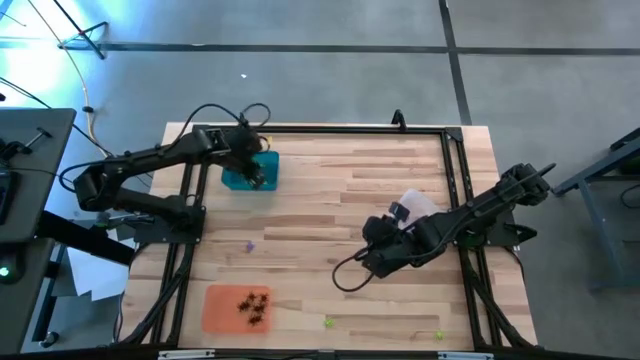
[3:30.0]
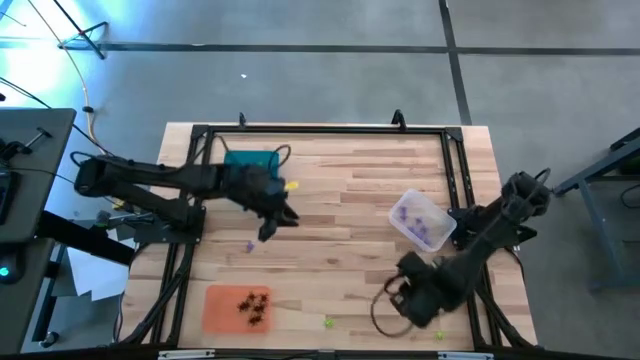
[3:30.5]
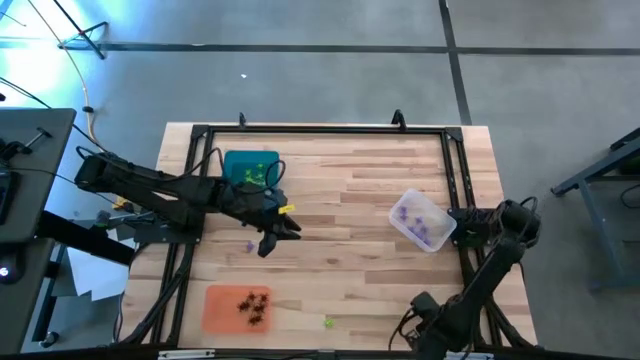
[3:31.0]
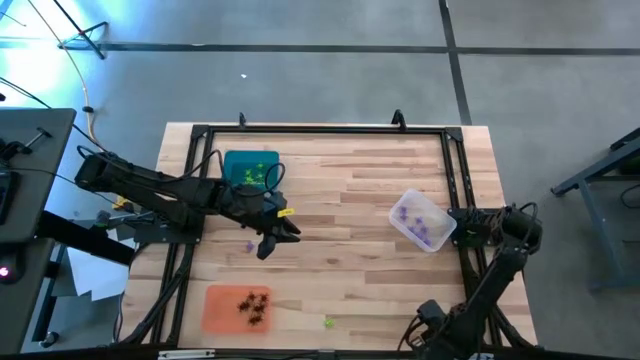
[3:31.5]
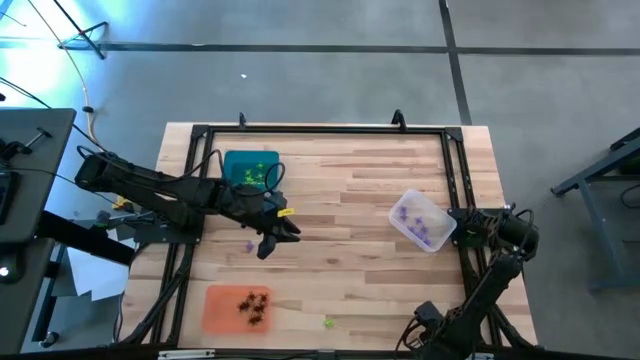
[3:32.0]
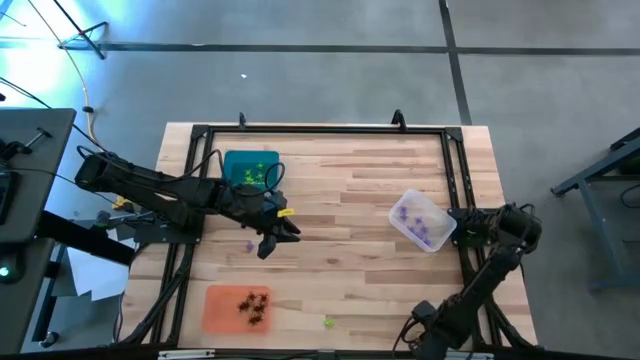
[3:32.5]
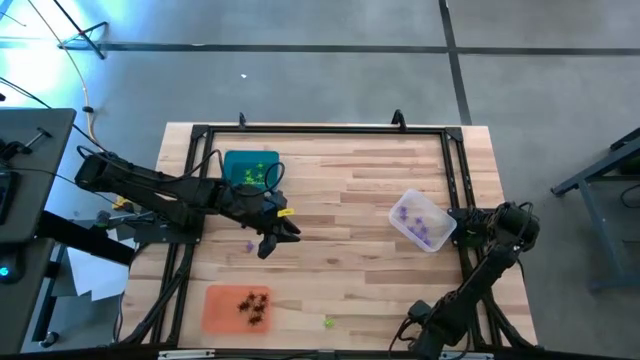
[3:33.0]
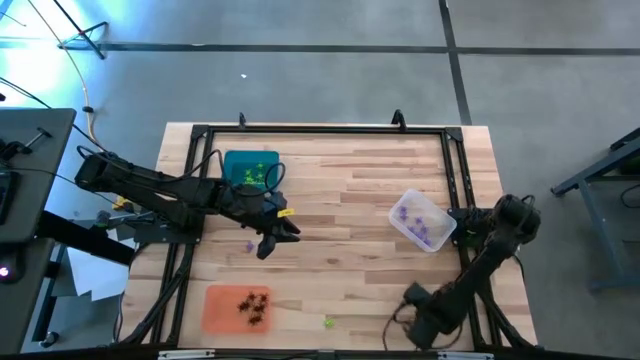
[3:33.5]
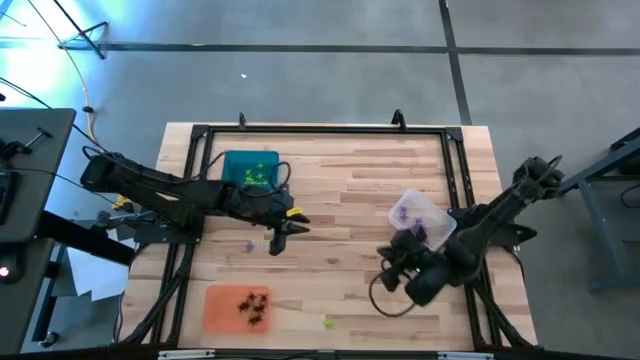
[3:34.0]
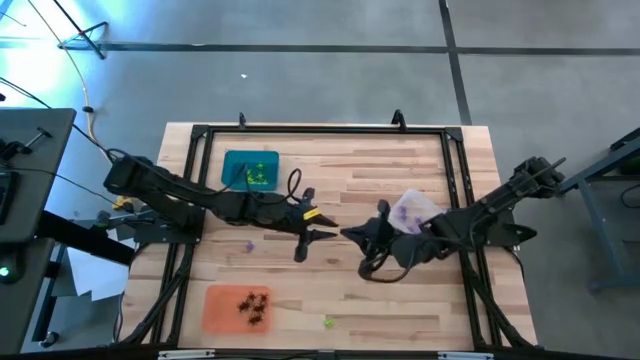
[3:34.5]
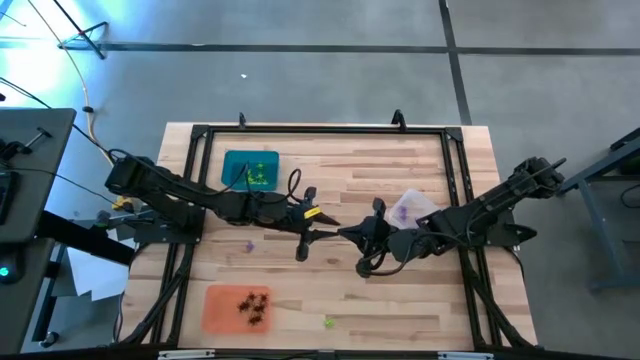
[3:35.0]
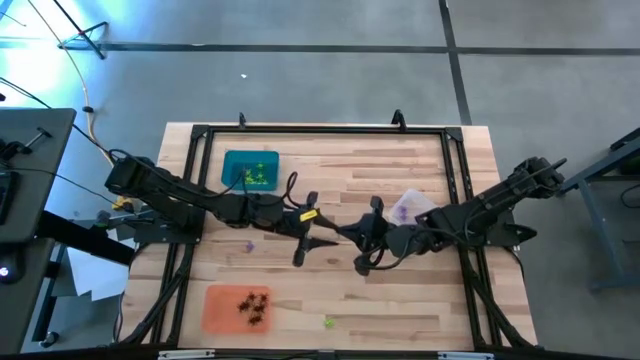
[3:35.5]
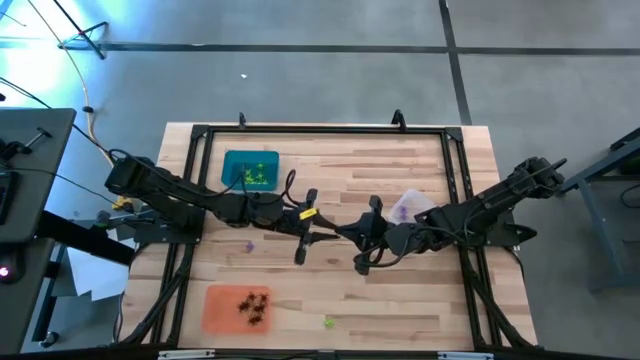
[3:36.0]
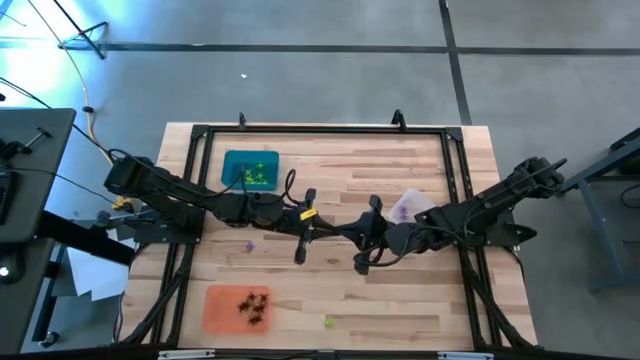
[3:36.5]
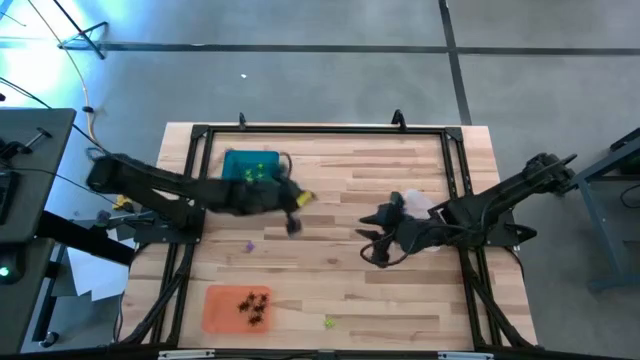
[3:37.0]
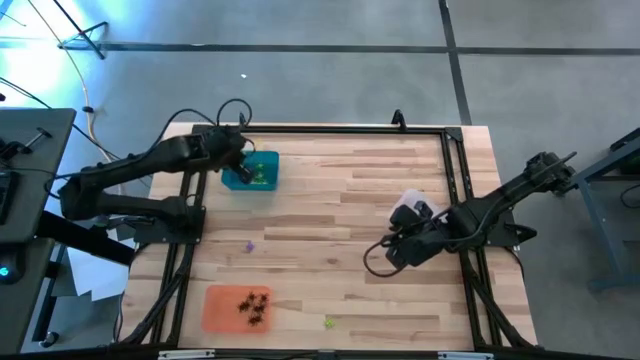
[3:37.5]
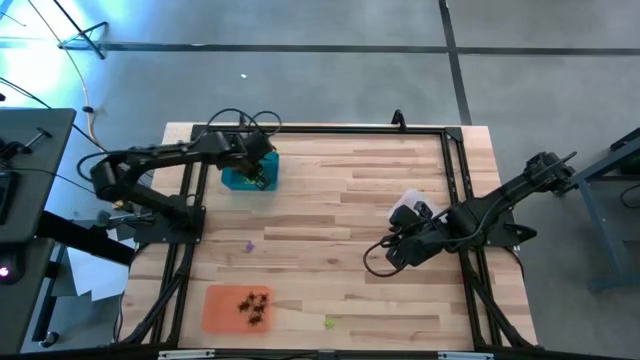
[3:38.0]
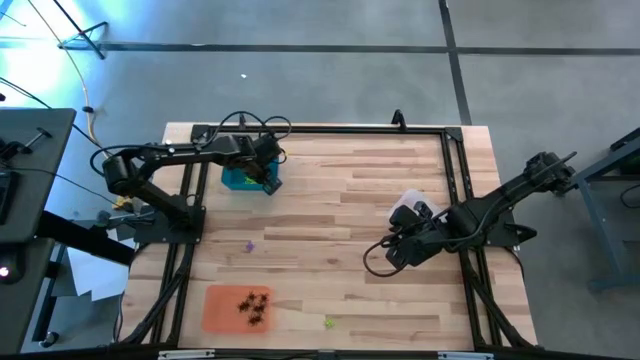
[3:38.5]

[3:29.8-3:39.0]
Task: Sort Halloween decoration
Put the green spider toy into the blue bin

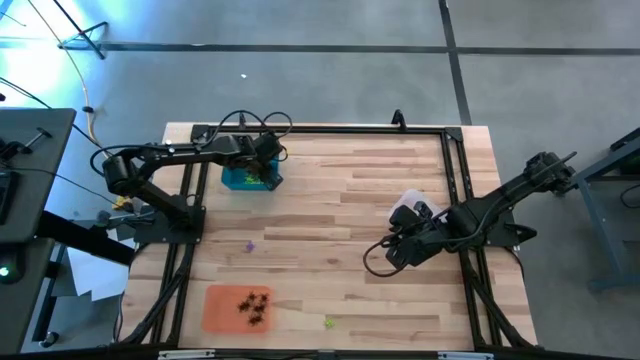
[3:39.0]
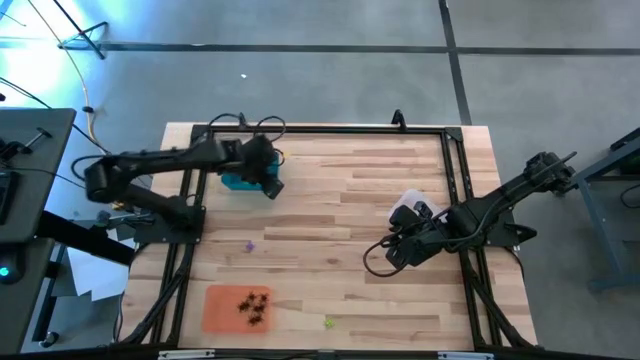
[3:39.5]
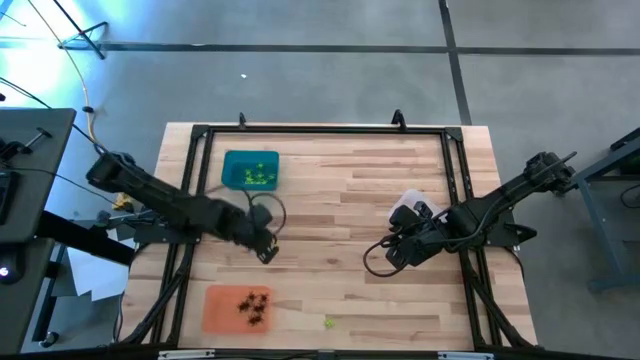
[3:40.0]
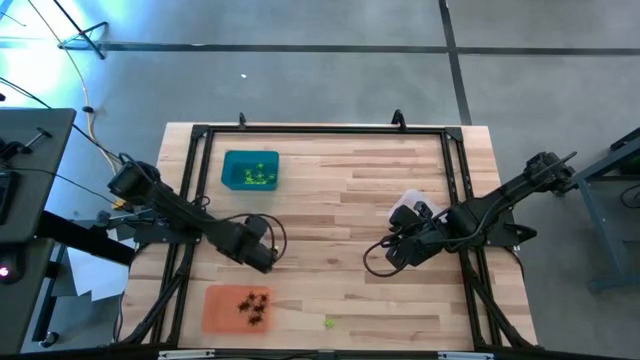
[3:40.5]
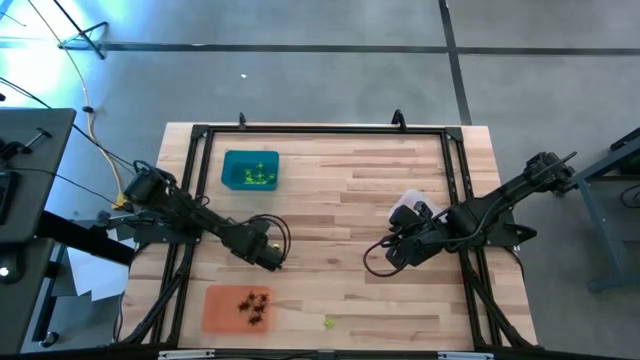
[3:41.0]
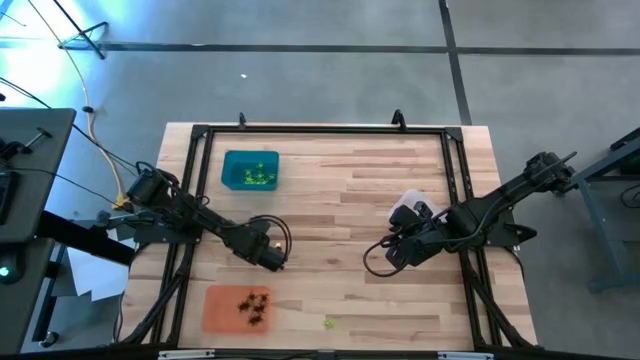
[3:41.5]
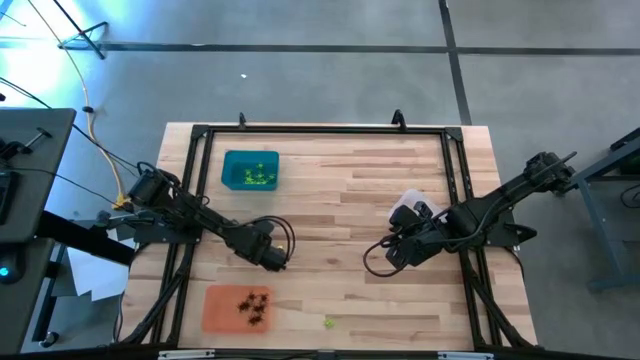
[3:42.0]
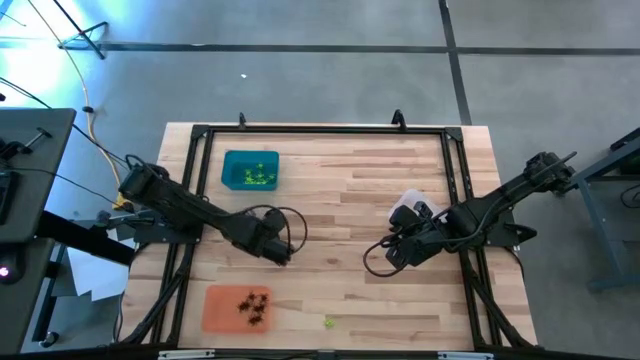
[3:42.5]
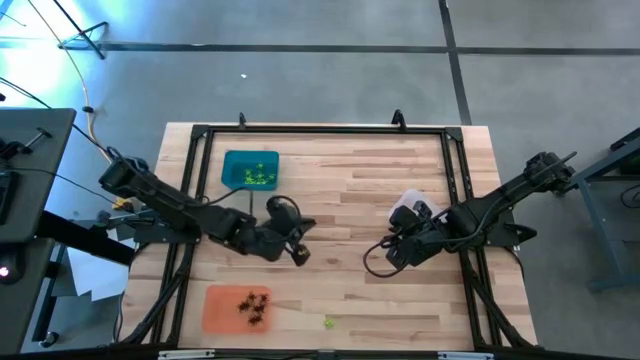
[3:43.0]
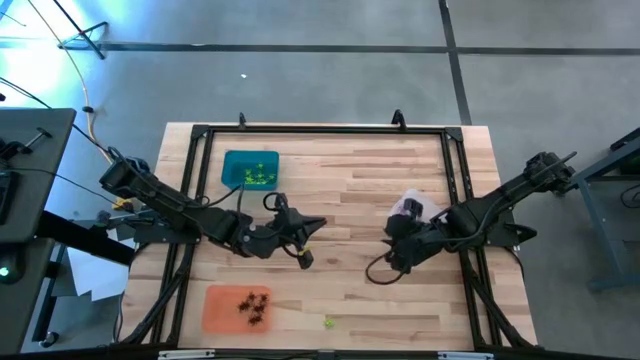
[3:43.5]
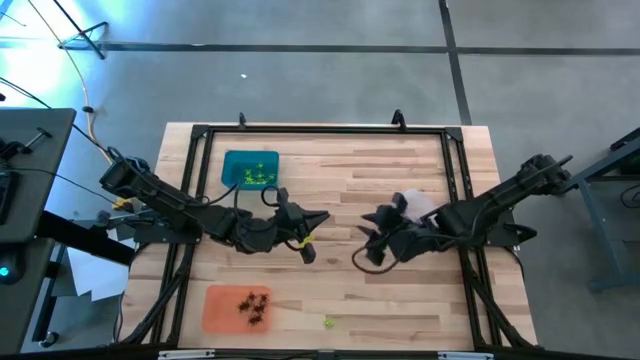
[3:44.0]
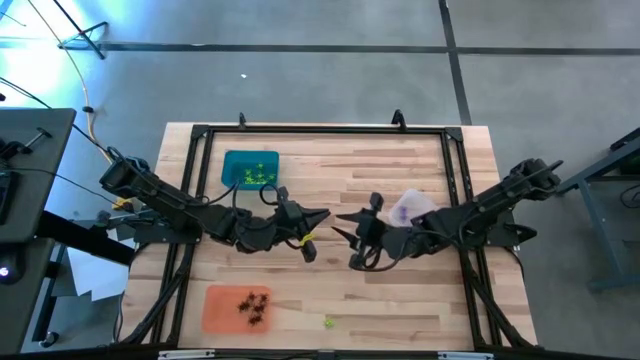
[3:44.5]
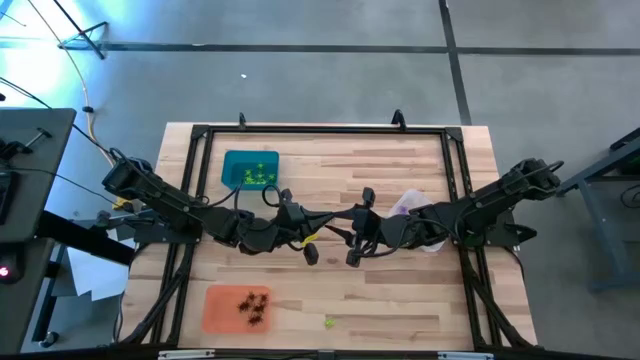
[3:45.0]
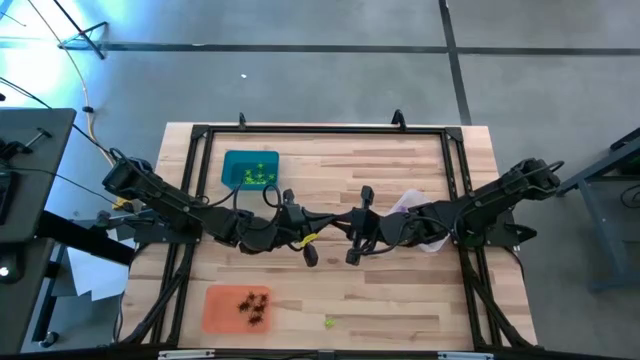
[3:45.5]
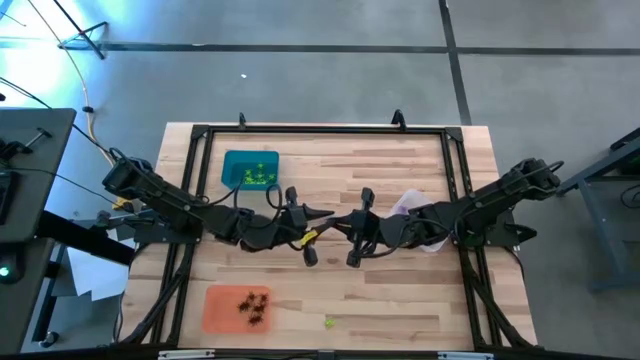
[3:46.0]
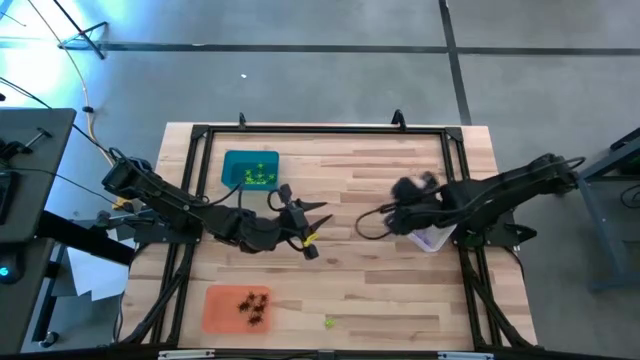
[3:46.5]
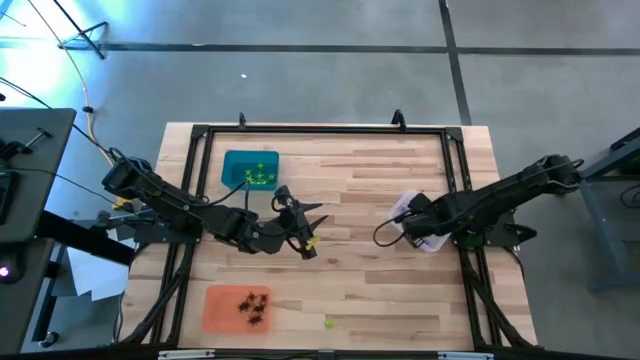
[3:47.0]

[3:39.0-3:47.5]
Put the violet spider toy into the transparent bin

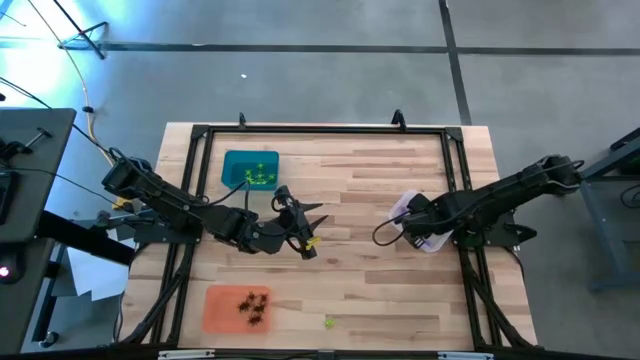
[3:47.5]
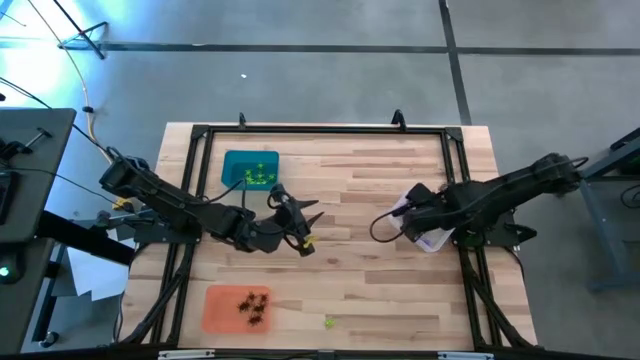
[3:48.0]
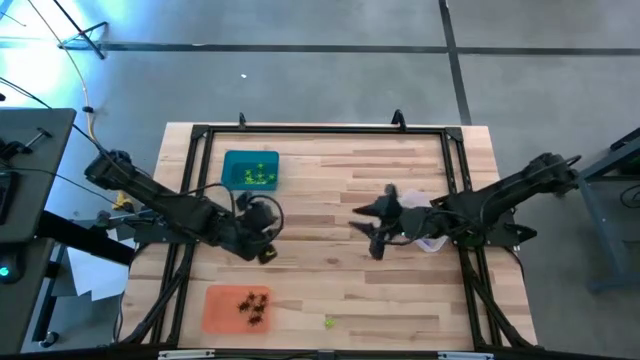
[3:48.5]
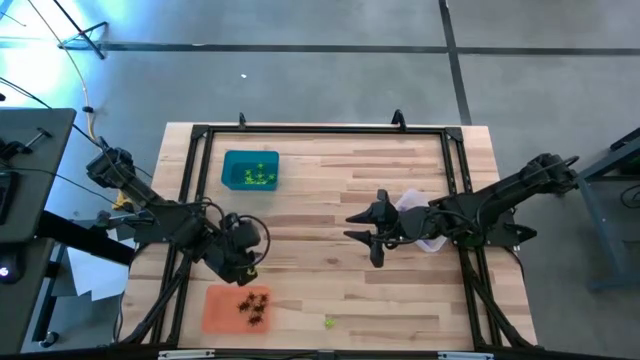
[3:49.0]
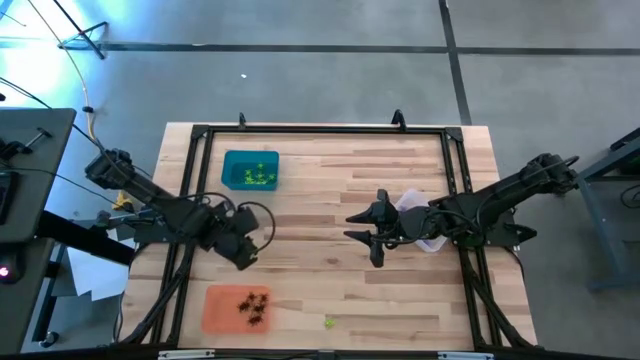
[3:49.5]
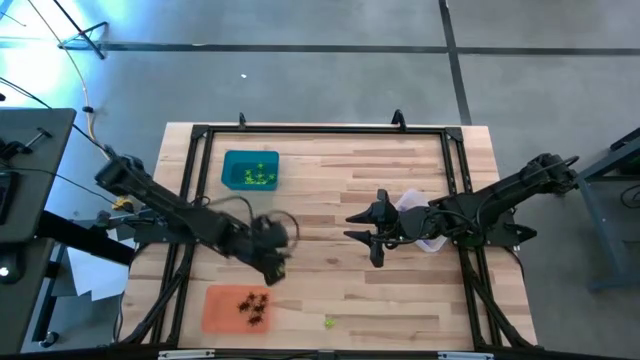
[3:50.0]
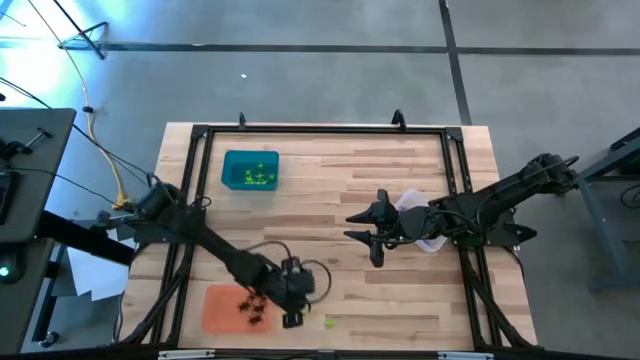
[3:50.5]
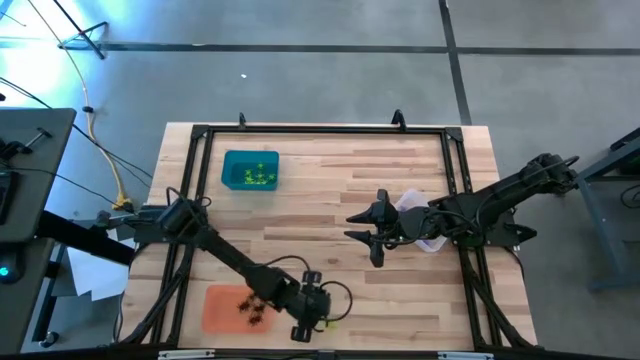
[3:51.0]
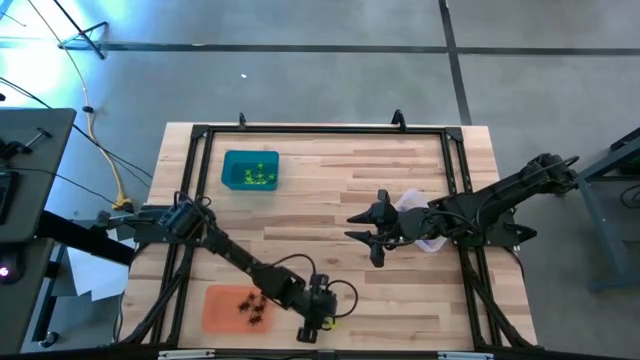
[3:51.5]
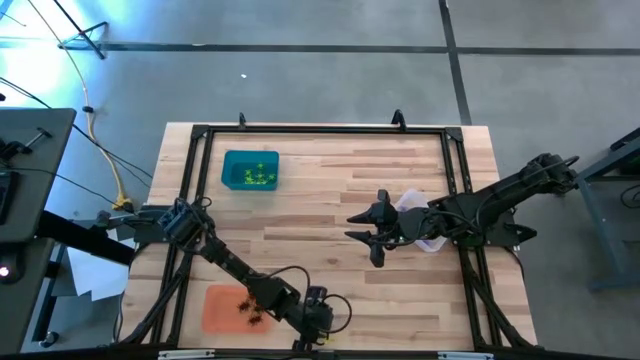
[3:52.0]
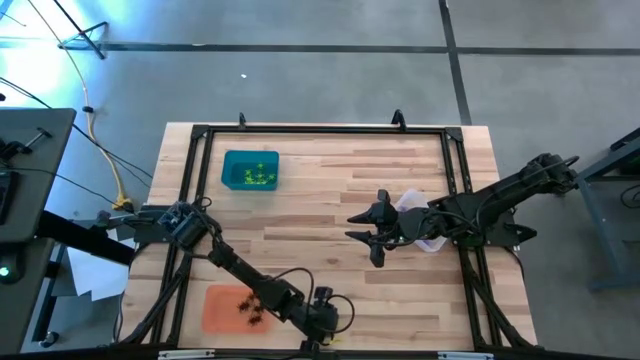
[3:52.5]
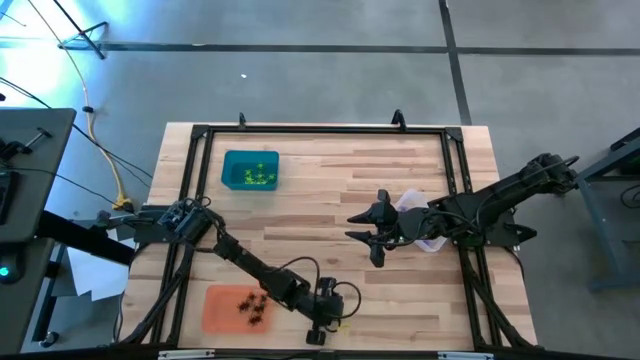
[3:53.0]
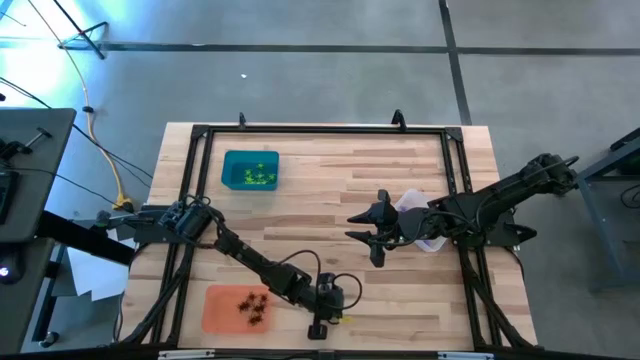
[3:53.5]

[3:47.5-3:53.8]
Put the green spider toy into the blue bin
